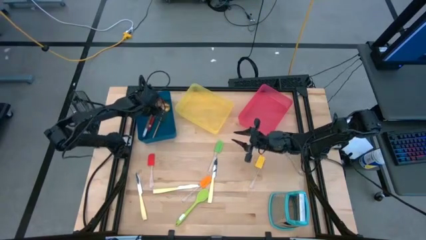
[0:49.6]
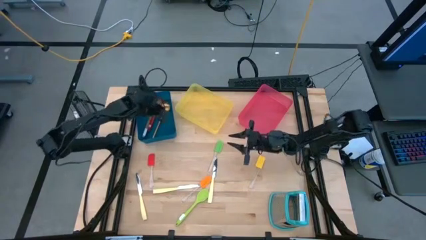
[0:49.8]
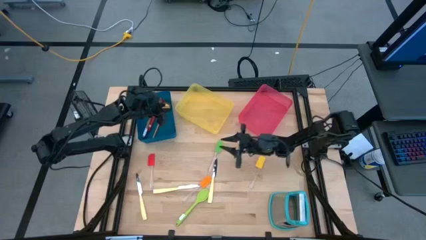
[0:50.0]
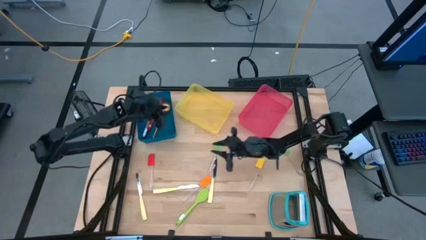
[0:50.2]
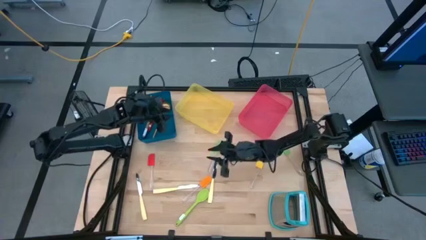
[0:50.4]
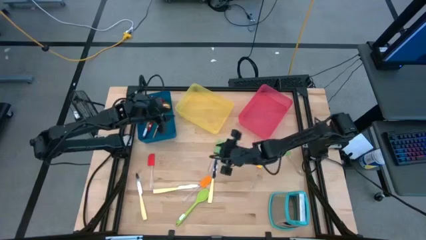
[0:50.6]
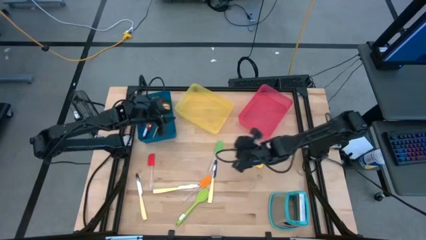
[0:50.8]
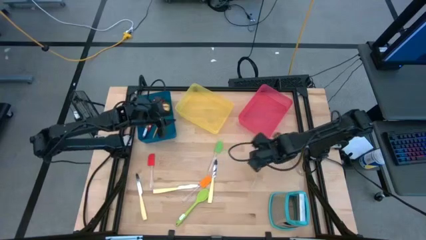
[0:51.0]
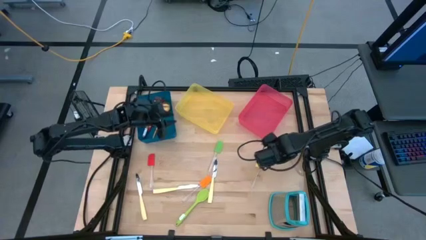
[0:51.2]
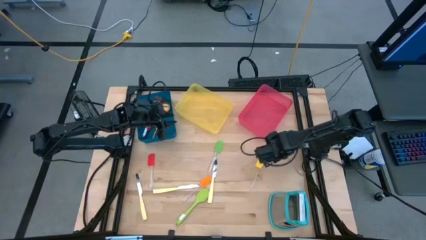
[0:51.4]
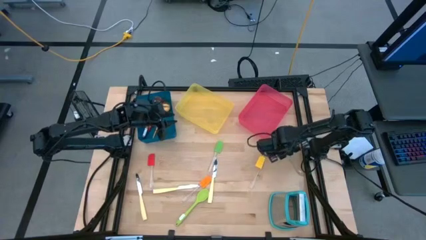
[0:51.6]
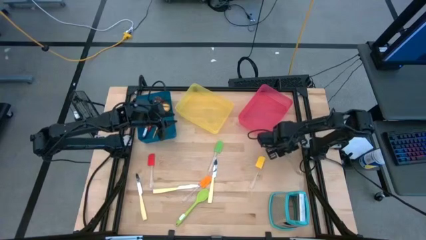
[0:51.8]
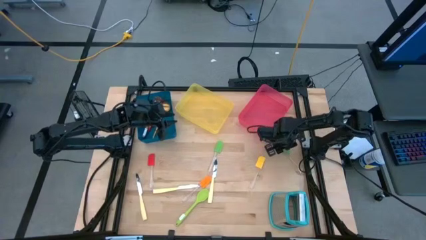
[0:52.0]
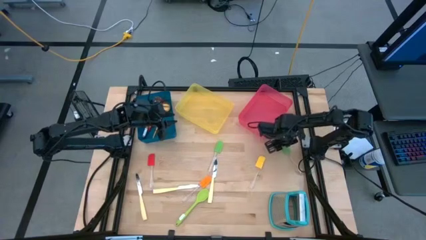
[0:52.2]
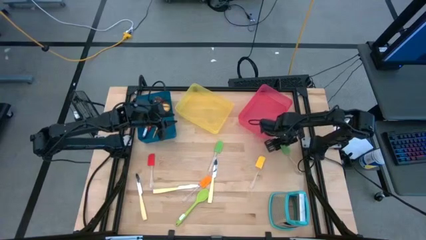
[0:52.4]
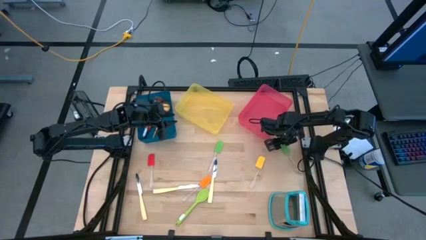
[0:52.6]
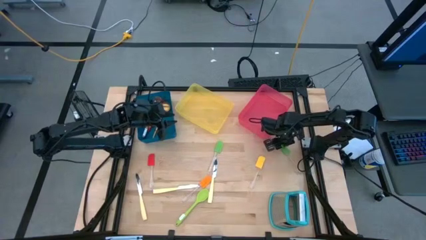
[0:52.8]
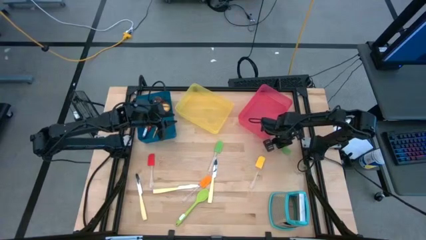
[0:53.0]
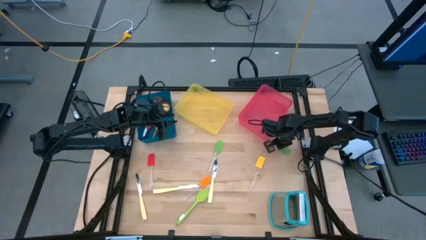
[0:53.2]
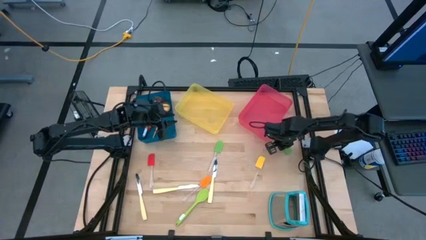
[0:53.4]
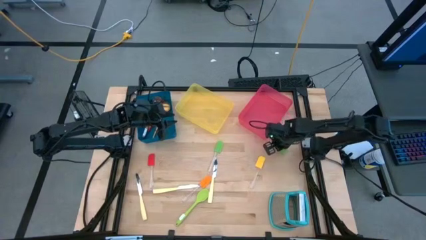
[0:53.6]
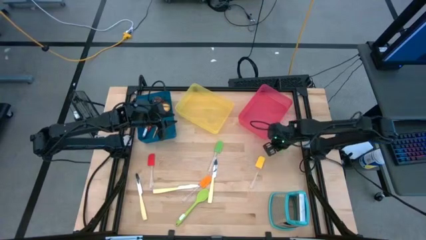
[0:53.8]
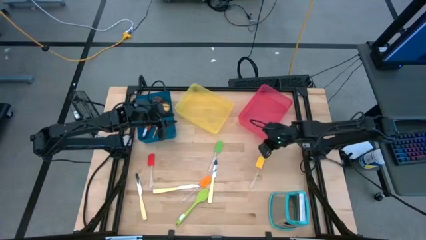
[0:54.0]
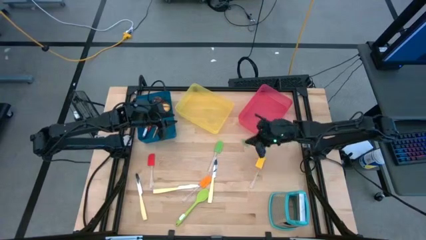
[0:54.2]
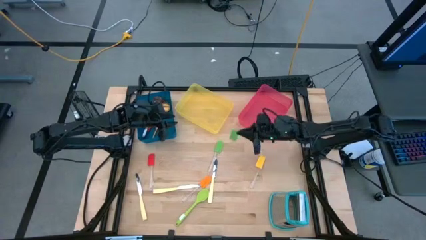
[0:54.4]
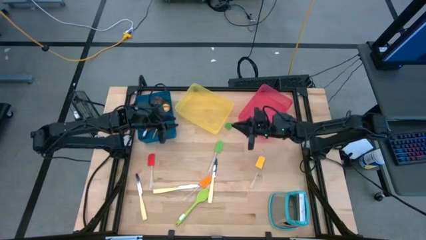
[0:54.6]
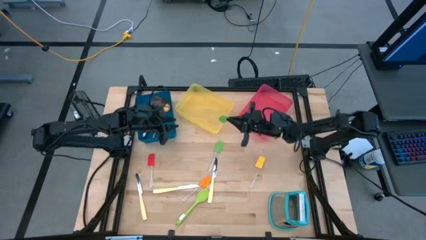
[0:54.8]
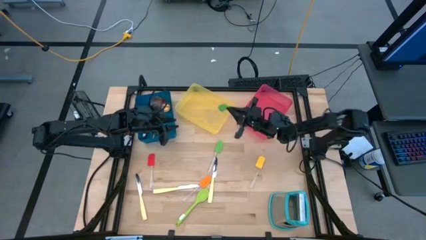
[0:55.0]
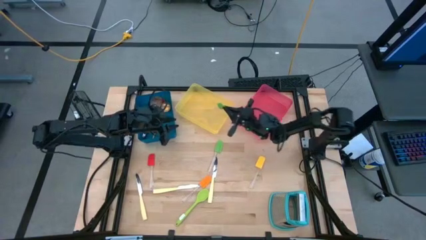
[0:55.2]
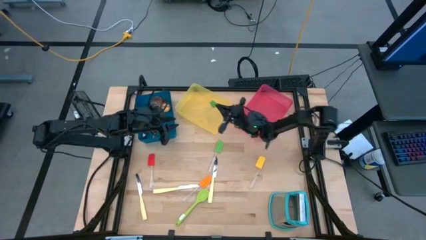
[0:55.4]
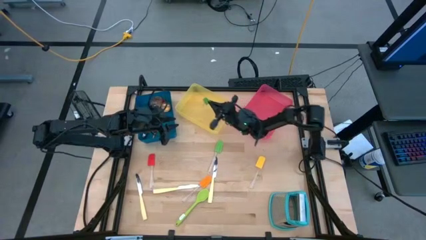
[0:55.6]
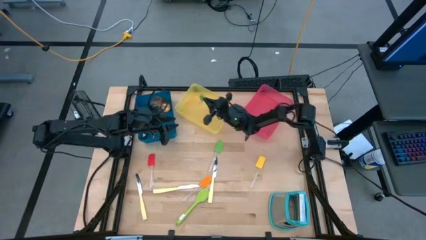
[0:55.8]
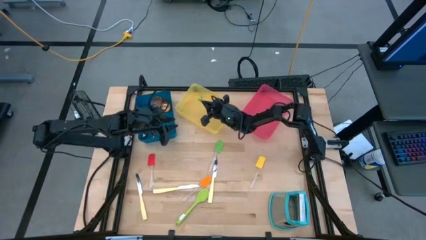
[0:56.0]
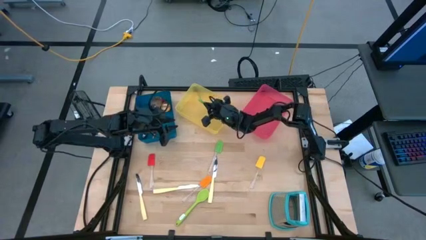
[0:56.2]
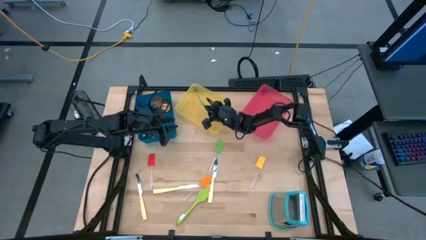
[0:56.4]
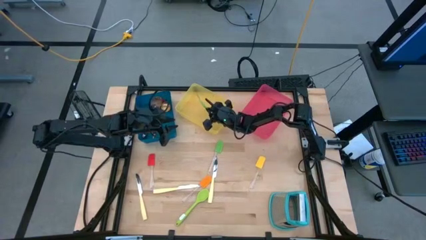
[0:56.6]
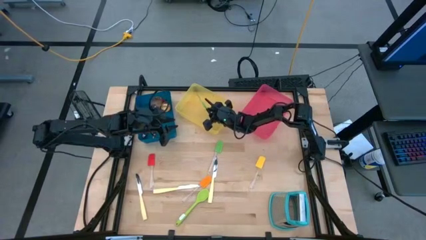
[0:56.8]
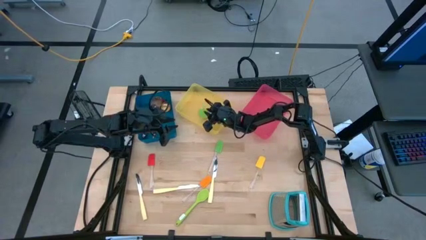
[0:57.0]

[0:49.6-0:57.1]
Task: Pick & Place Kitchen Items
Put the right green spatula into the yellow bin

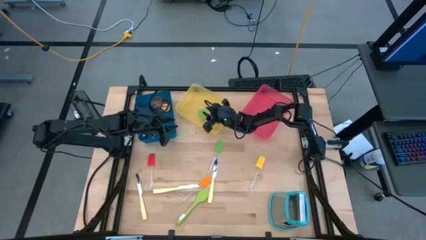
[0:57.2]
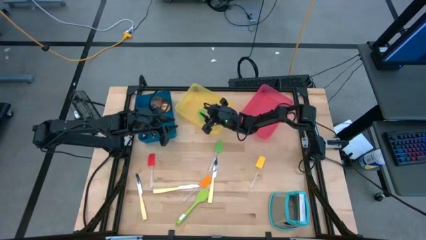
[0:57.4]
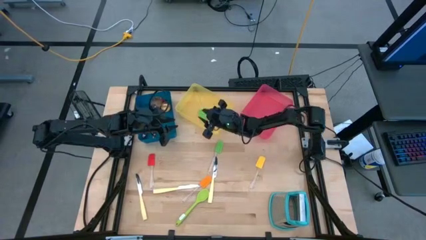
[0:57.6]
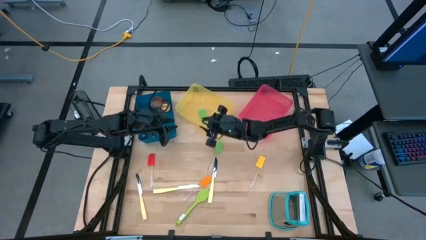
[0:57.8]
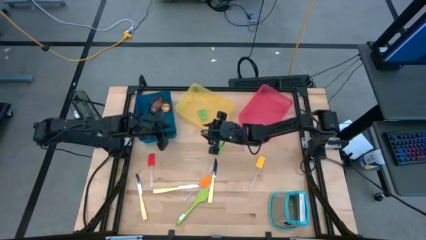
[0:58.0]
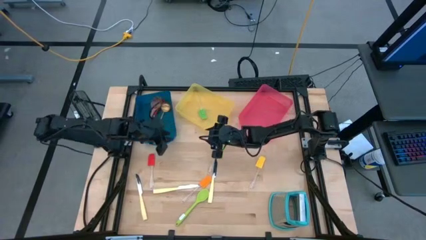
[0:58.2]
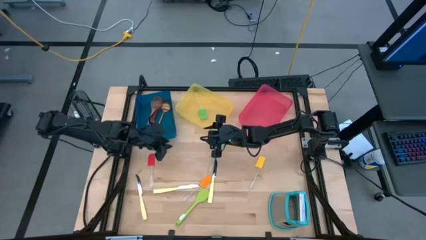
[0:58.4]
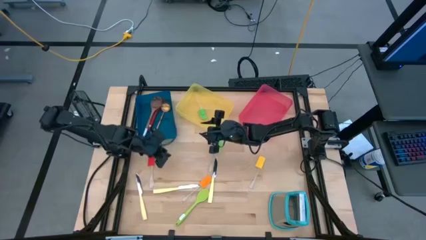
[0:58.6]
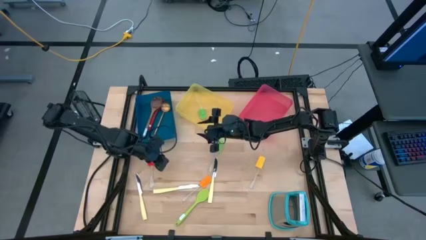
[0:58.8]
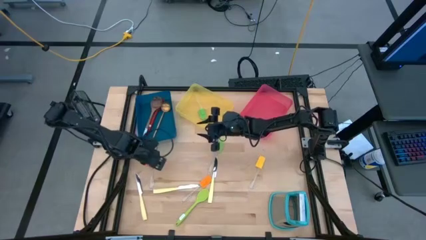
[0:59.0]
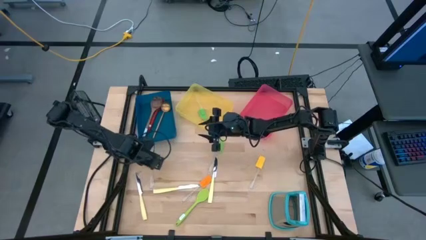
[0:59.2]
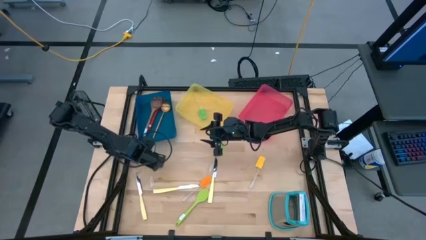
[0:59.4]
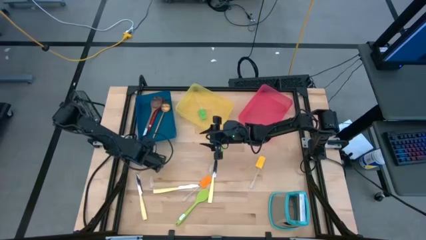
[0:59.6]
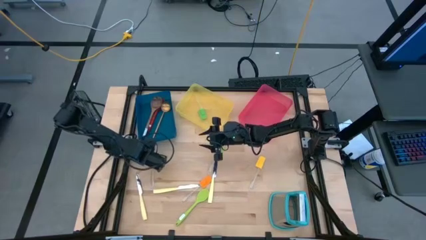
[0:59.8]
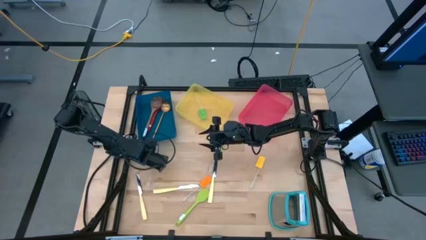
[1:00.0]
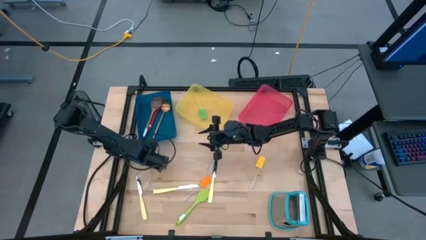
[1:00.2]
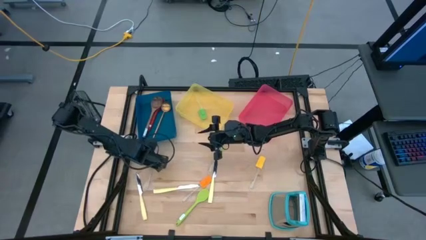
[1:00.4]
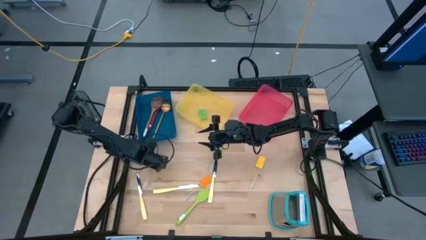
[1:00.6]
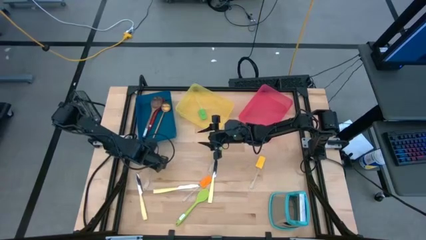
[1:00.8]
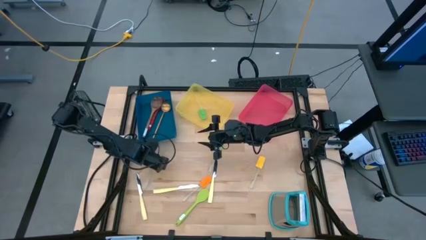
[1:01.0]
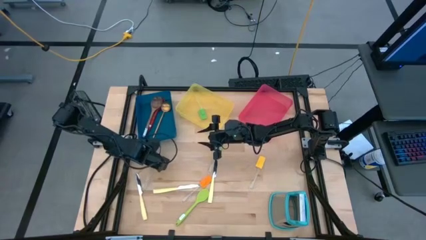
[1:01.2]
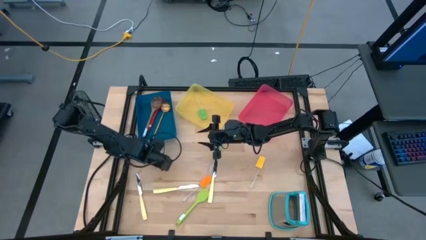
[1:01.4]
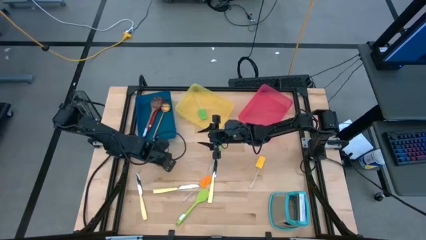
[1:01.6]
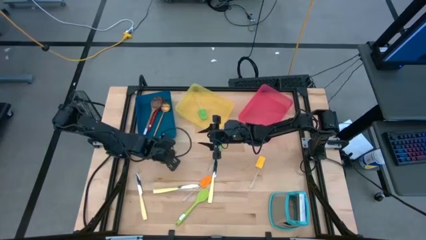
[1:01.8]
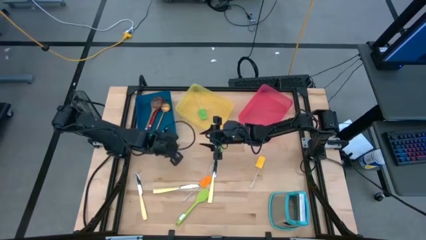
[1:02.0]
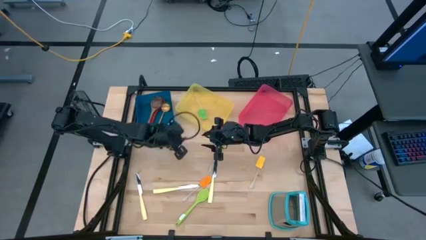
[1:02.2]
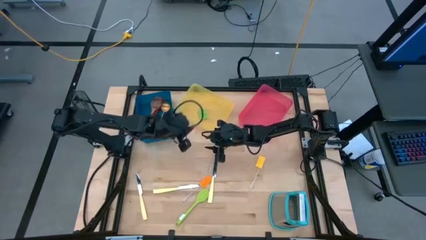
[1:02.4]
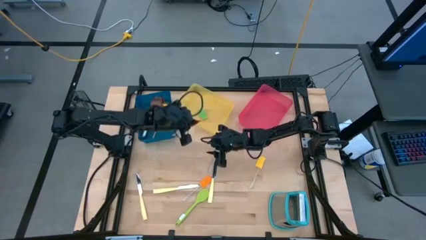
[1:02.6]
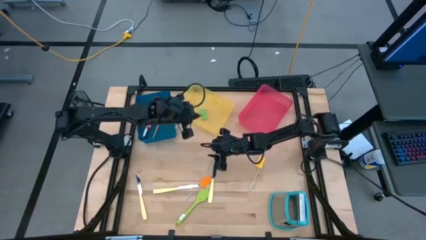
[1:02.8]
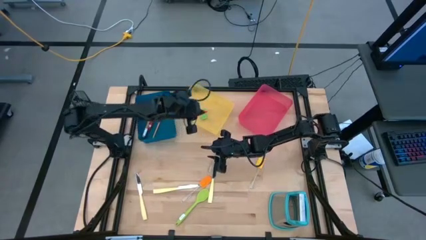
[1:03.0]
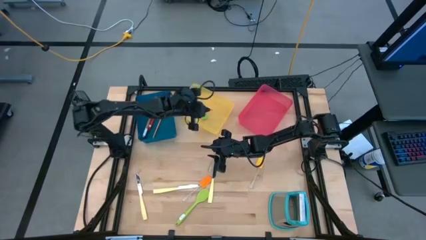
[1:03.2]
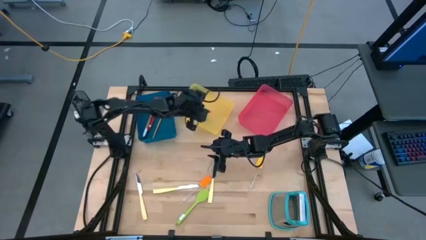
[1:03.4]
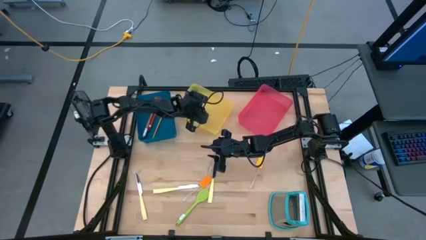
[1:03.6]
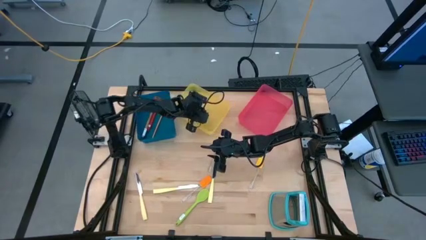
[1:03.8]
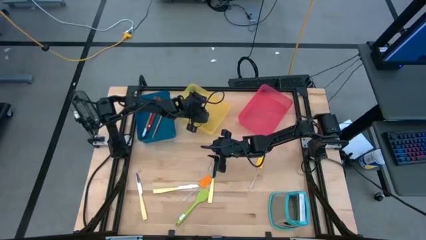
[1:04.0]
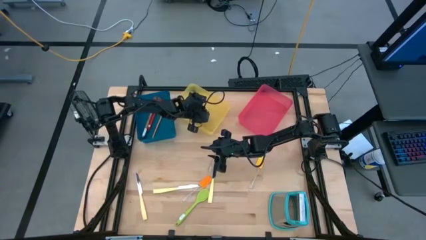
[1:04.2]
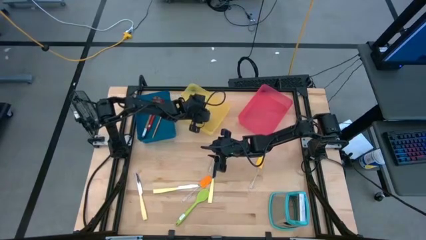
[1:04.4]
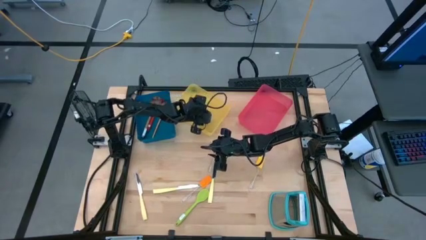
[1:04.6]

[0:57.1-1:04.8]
Put the red spatula into the yellow bin
